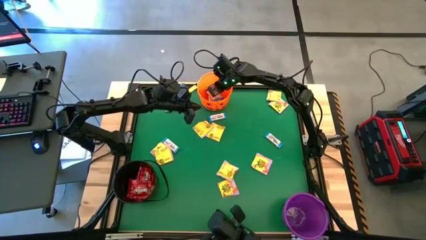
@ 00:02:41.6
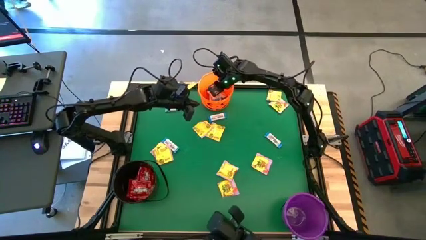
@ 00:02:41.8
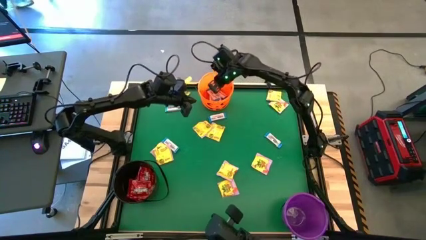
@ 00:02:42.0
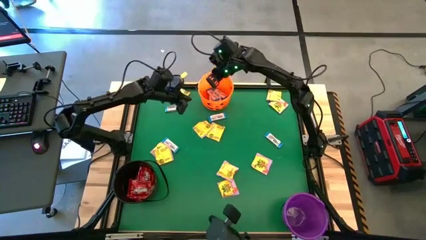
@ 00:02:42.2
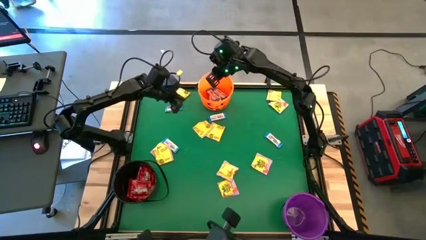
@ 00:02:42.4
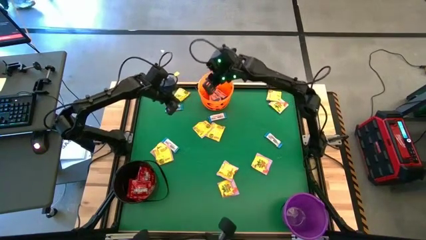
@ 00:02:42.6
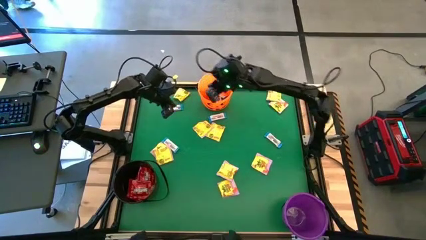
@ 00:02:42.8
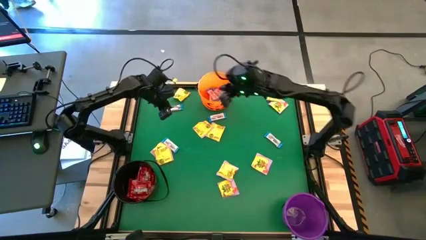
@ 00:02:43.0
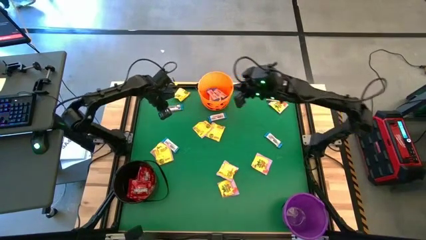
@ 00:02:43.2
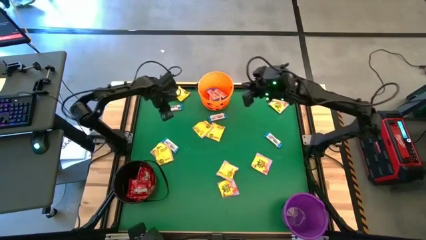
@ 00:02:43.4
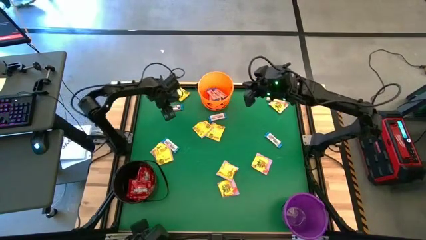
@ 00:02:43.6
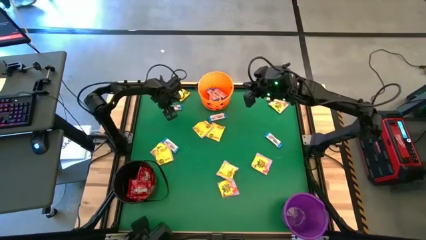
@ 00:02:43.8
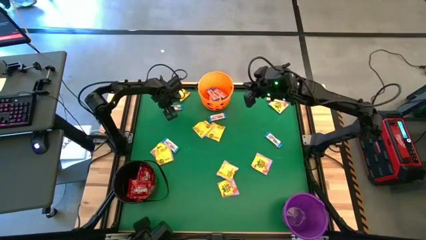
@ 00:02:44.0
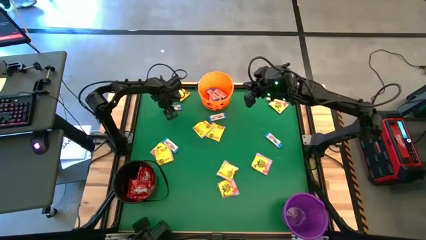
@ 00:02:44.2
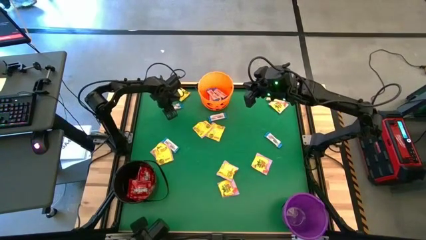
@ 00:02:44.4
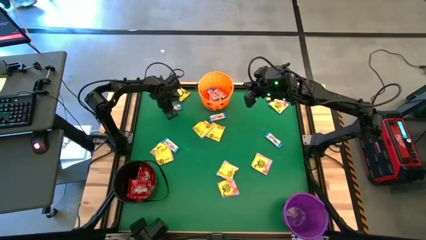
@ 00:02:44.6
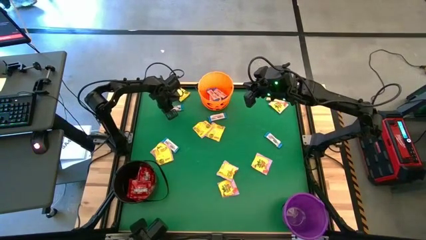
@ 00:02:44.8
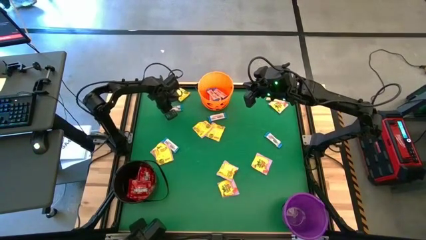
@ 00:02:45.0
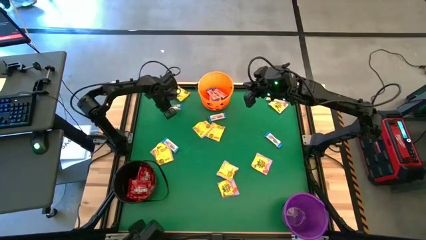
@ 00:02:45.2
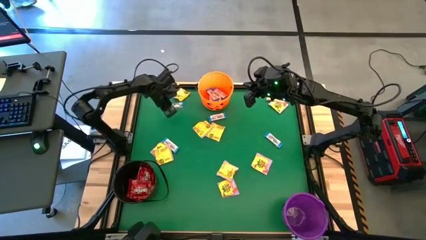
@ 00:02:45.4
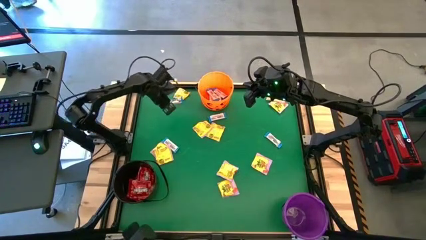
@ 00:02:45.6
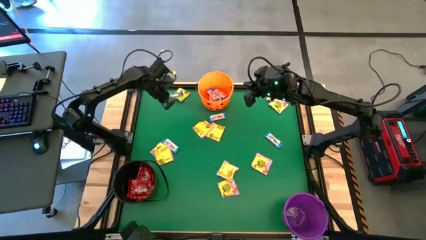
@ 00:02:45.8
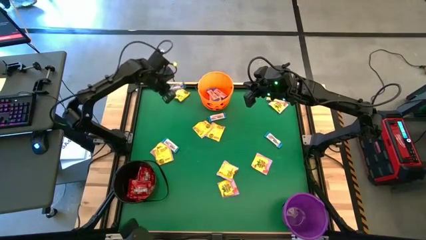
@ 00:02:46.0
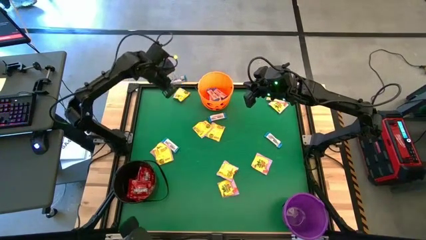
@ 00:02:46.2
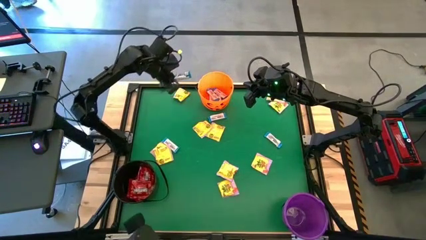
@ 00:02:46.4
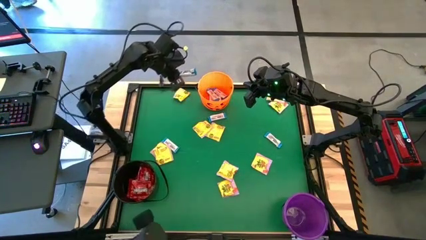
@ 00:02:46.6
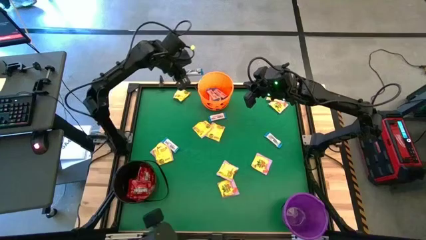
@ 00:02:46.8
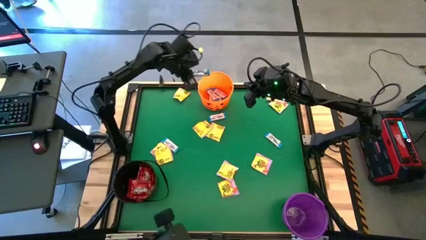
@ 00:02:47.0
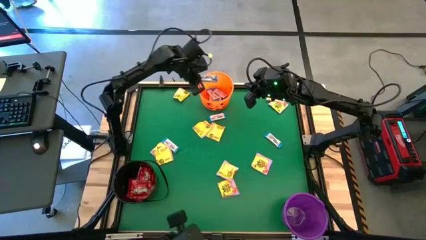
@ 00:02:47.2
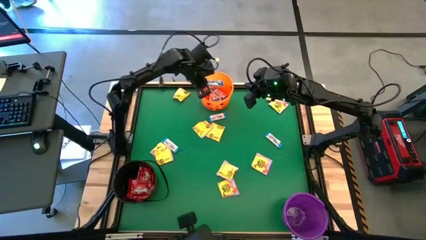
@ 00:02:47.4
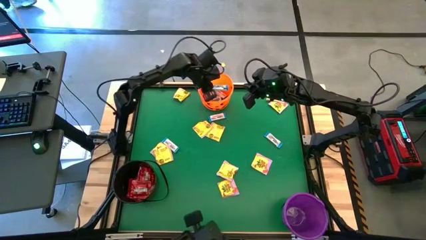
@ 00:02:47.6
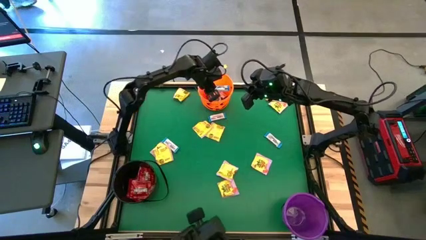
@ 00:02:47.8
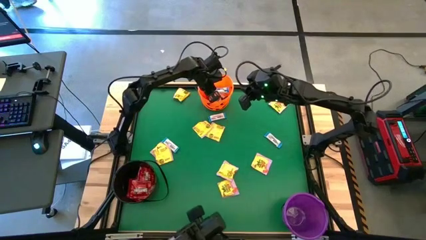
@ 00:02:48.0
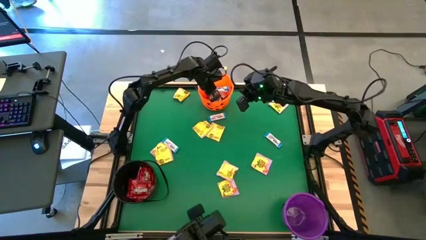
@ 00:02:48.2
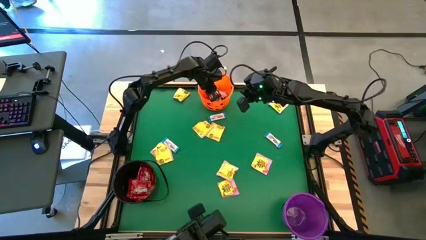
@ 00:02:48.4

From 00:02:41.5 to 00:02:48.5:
Task: Sort candy by brand, put in halloween buckets
Put the white chocolate into the orange bucket

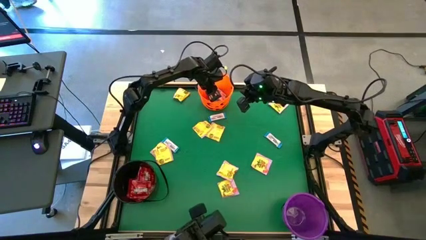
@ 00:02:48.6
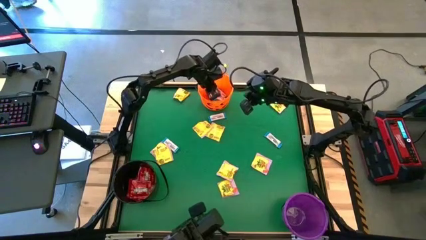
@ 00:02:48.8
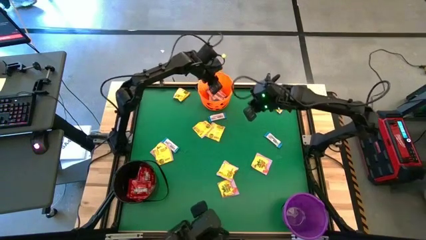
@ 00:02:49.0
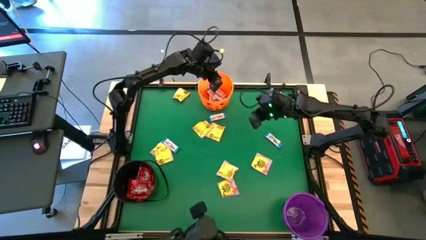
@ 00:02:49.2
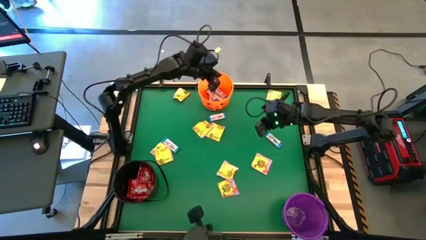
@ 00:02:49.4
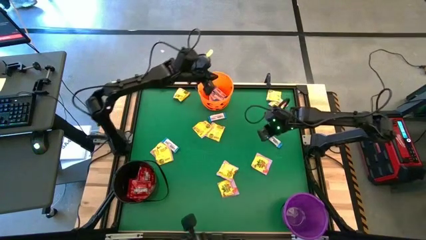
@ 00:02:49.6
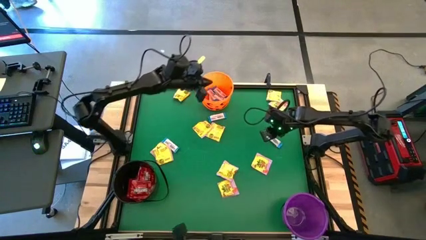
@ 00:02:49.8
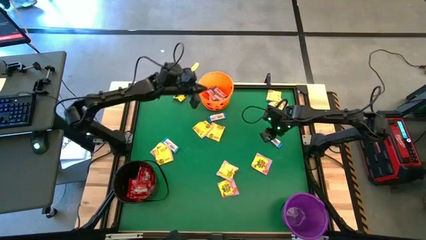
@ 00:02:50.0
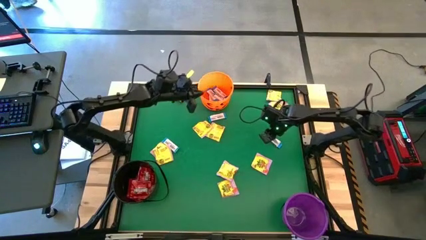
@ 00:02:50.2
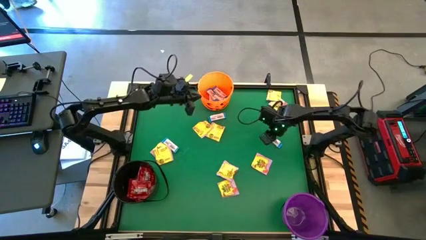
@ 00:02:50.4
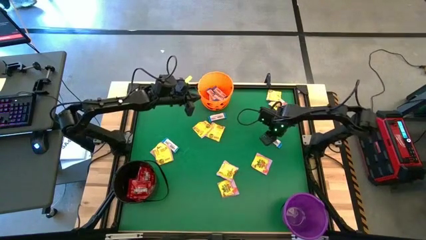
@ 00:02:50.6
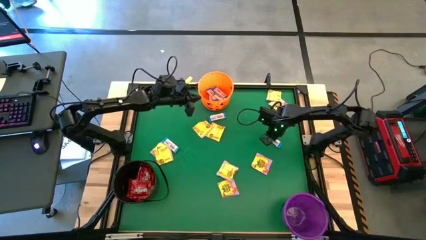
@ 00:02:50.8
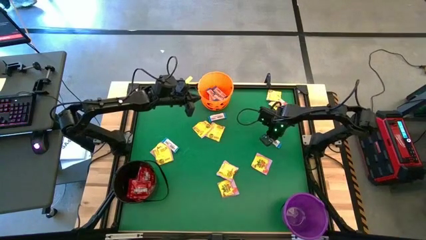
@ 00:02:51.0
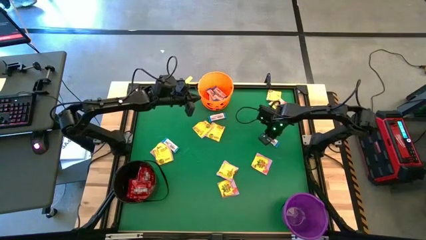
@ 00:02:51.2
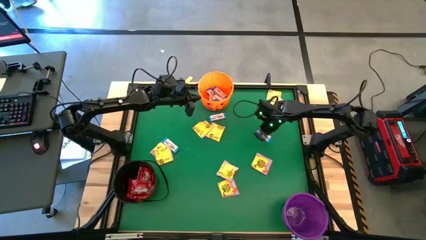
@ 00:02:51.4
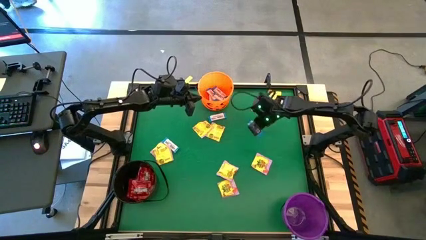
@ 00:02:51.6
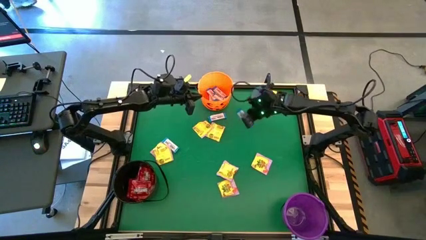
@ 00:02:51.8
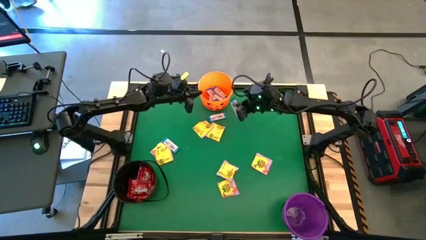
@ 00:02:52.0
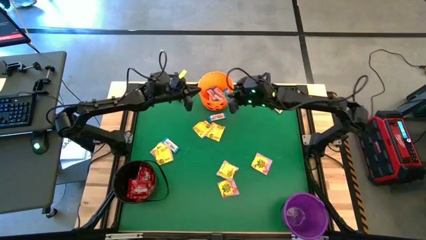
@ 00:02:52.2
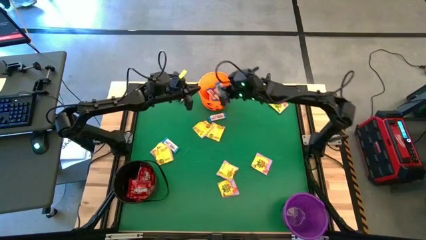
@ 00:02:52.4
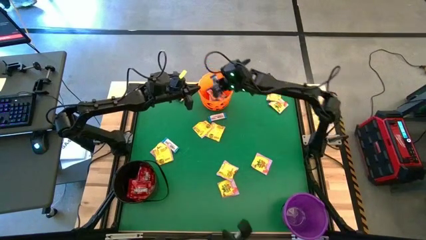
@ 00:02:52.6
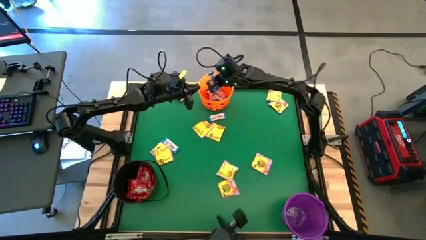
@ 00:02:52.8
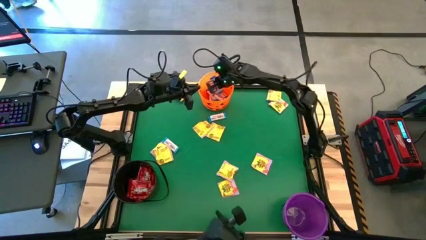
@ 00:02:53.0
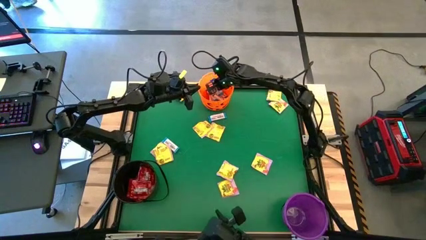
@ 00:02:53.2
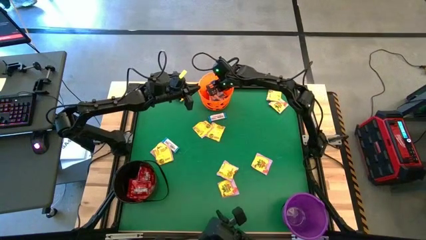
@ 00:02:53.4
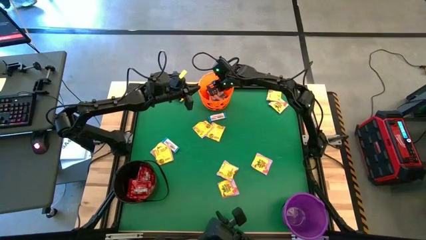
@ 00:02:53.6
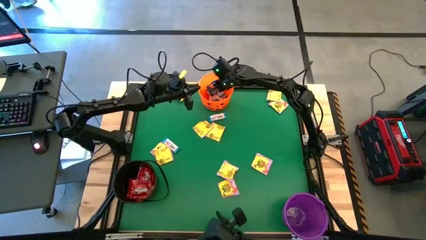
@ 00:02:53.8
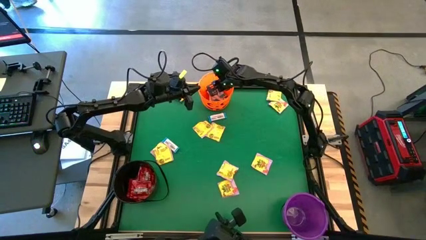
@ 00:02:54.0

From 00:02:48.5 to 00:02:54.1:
Put the white chocolate into the orange bucket

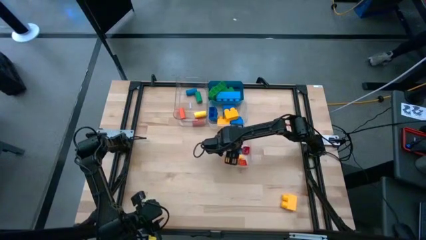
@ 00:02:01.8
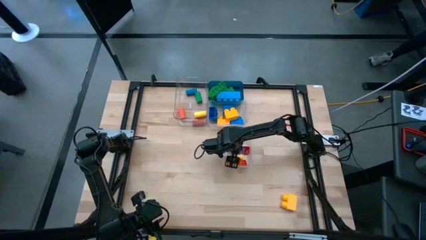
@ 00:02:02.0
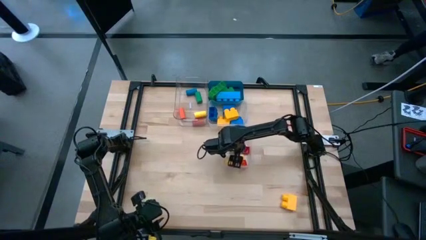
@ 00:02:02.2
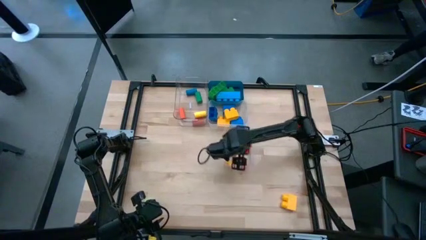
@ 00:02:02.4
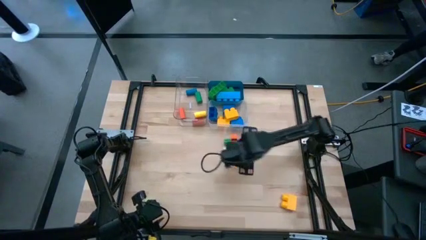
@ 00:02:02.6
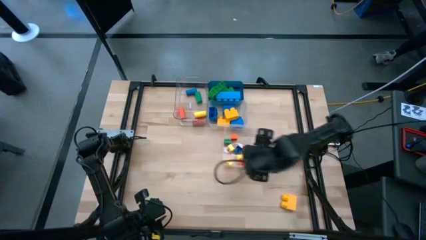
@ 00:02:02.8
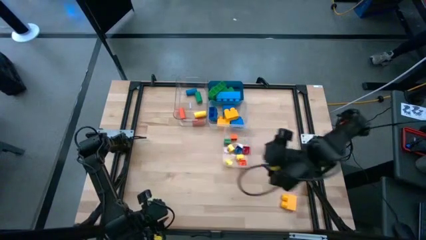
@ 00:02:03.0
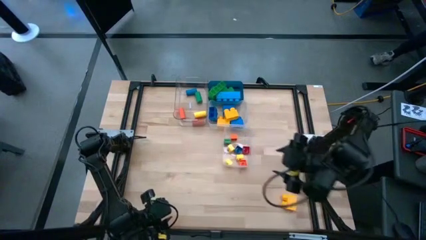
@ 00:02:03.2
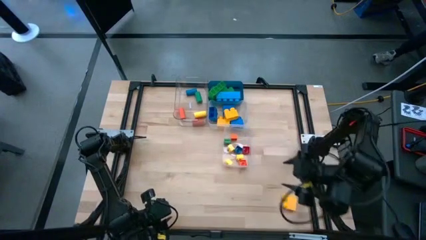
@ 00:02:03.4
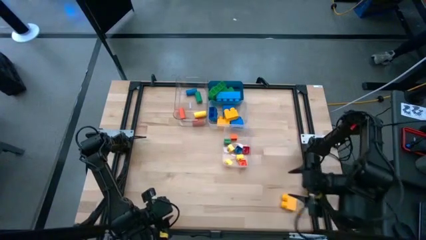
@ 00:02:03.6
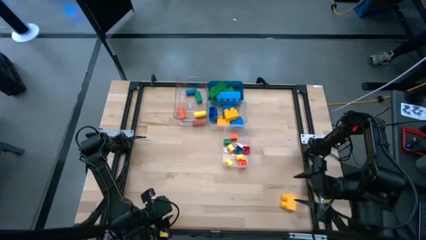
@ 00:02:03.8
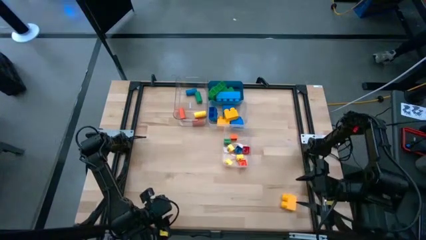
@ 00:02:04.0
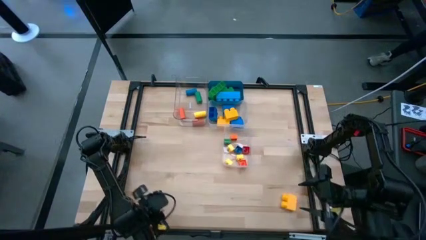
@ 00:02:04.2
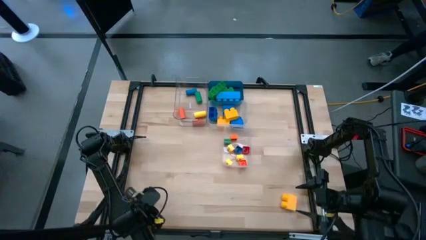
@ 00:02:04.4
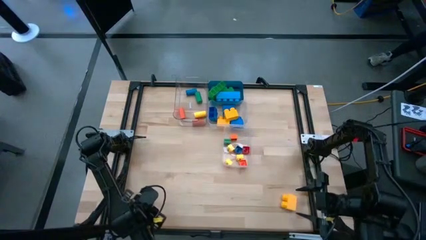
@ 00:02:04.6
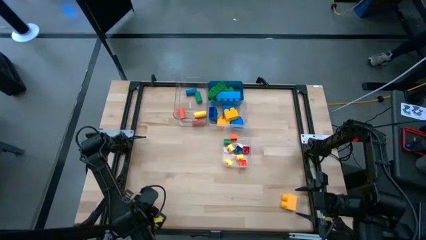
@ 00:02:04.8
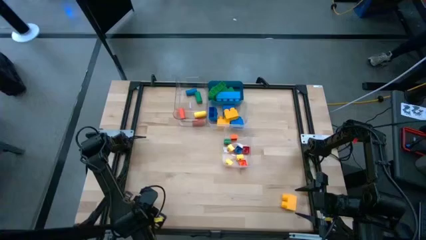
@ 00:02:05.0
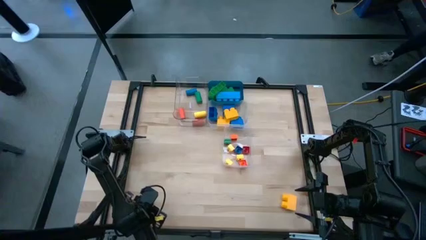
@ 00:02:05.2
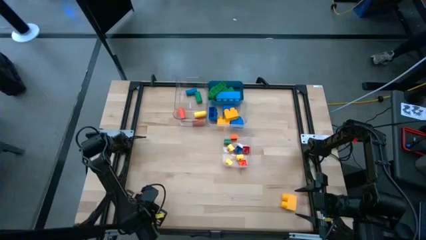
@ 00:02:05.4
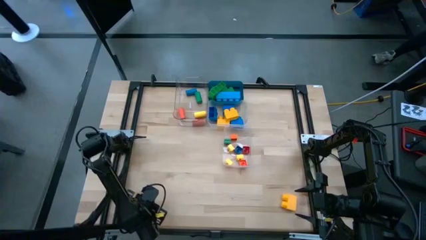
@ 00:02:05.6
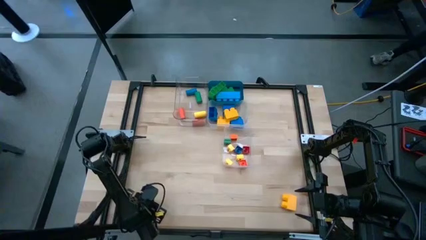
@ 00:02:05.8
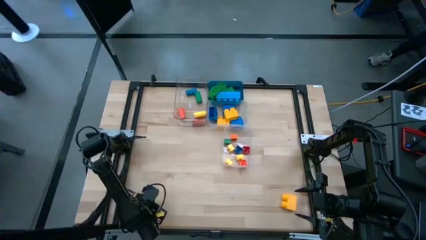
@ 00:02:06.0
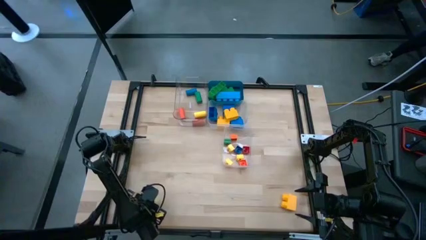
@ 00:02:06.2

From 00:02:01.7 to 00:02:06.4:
Task: Sort blocks by size
Put the green cylindrical block into the top left transparent bin
